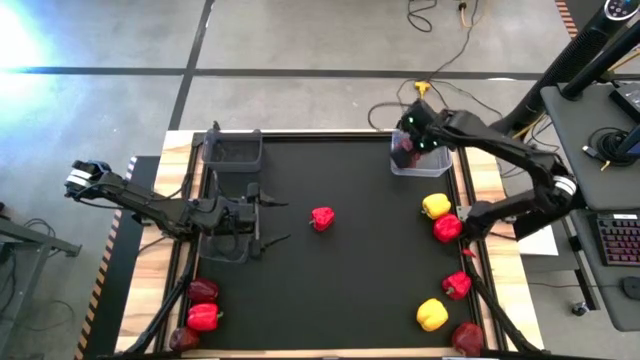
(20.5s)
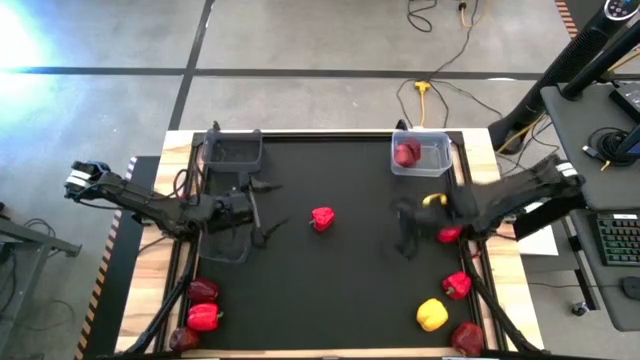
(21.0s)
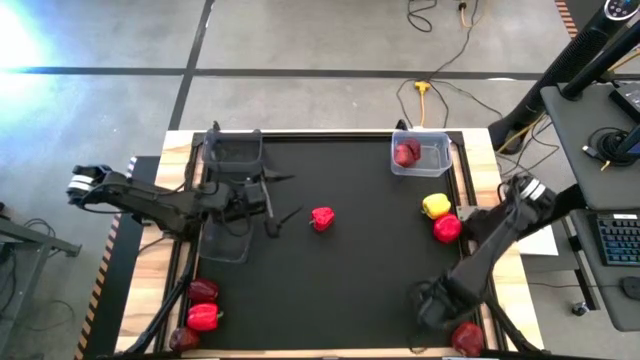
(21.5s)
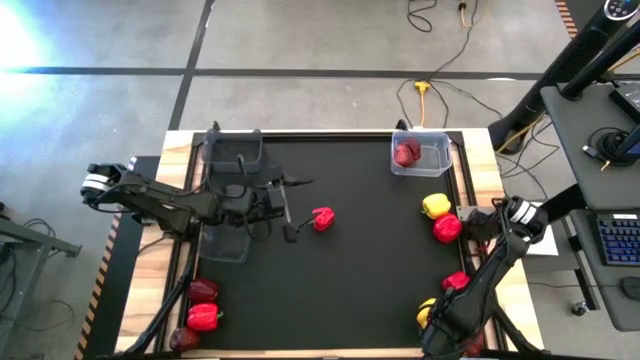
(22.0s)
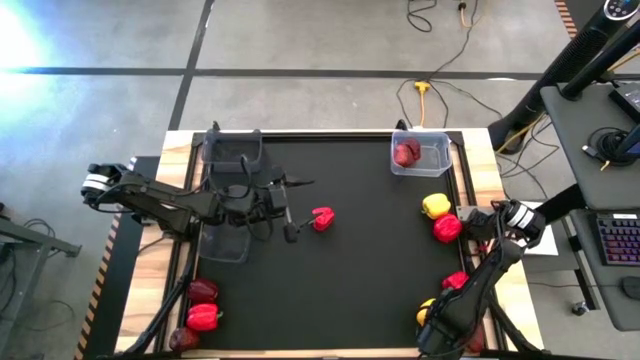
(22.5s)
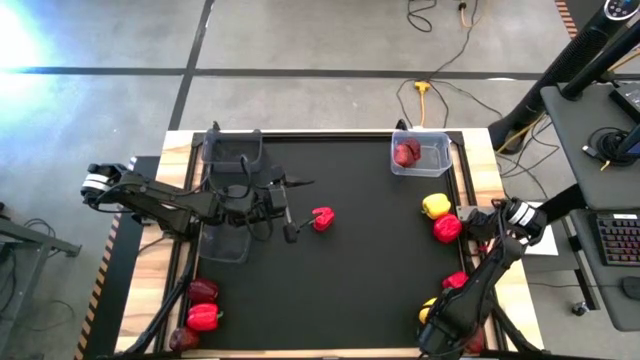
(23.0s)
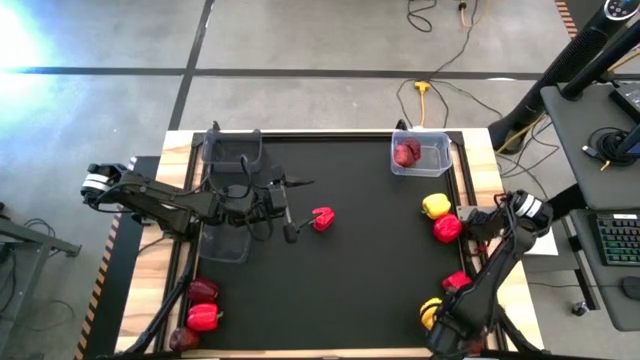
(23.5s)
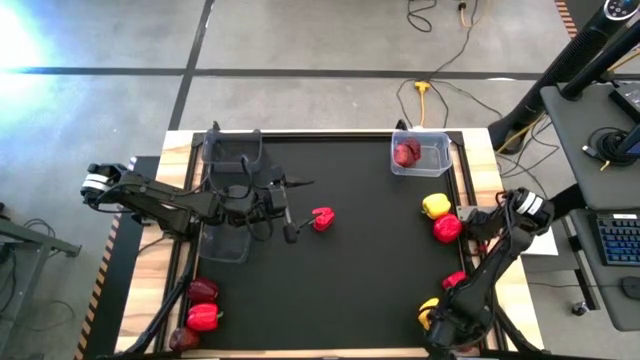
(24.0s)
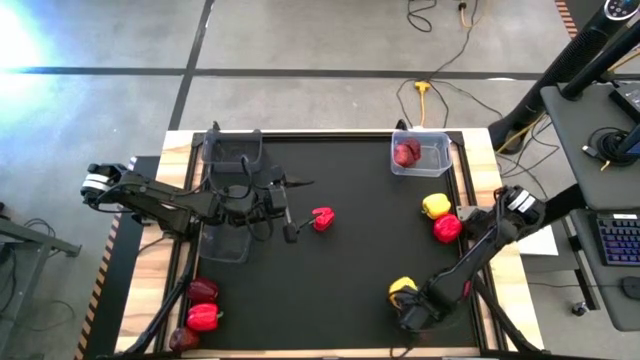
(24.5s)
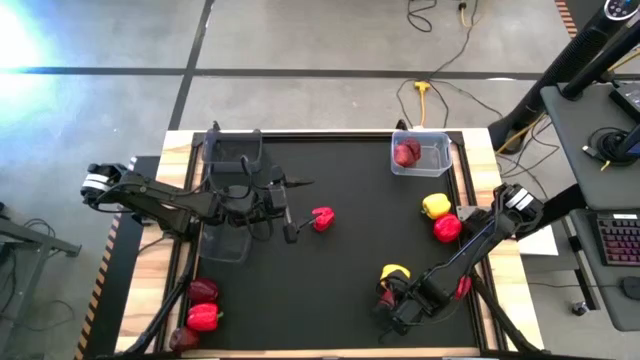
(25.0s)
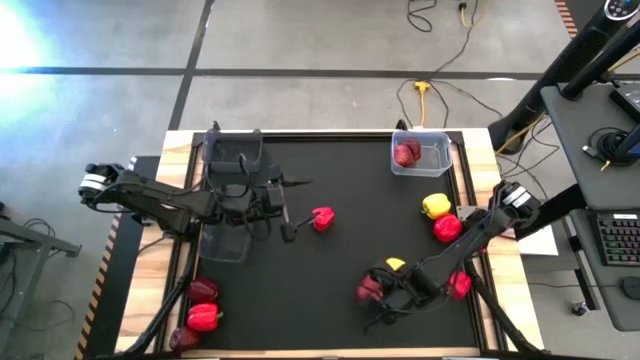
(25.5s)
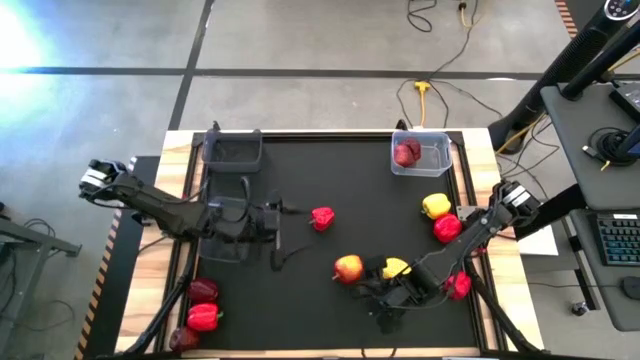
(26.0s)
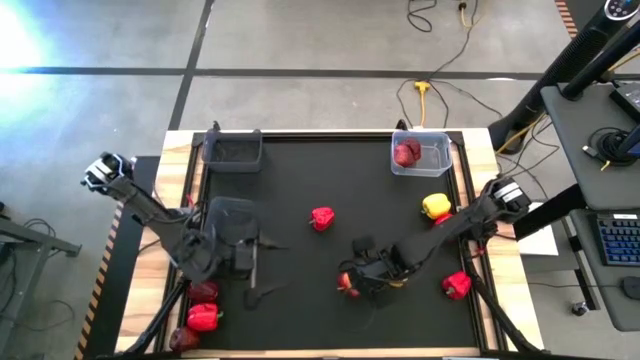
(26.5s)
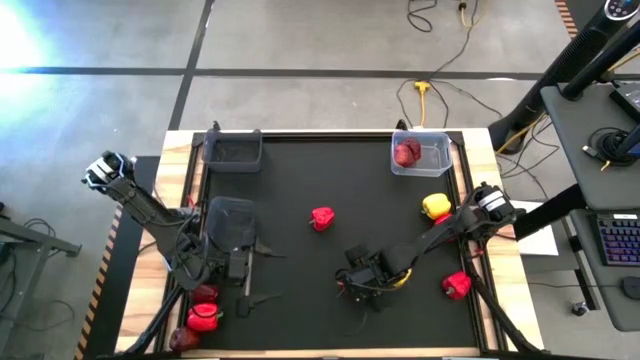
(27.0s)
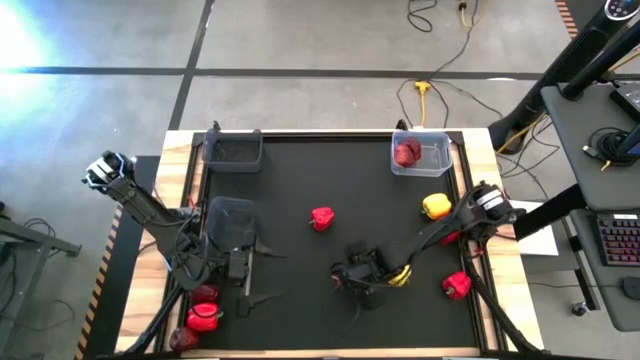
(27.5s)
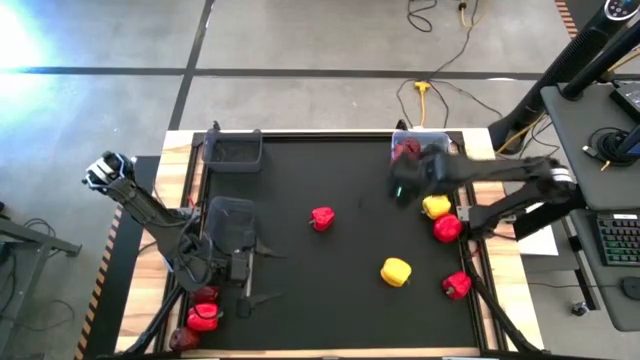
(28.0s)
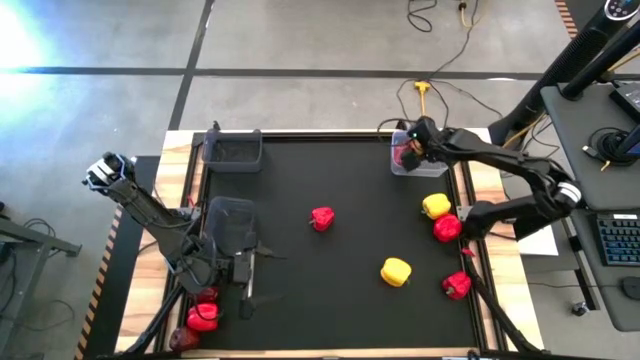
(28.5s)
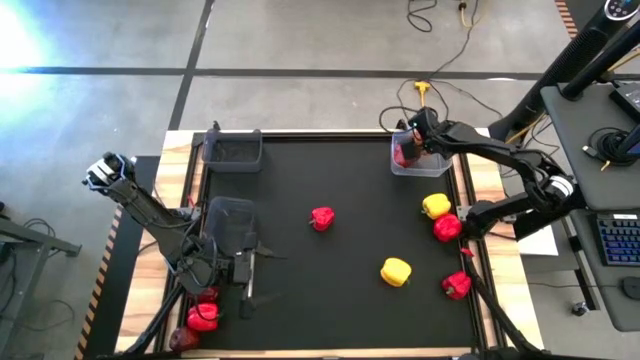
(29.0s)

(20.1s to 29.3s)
Task: Sort produce into baskets
Put the bottom right apple into the transparent bin

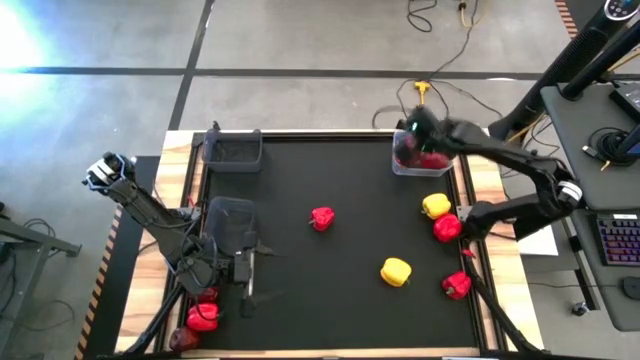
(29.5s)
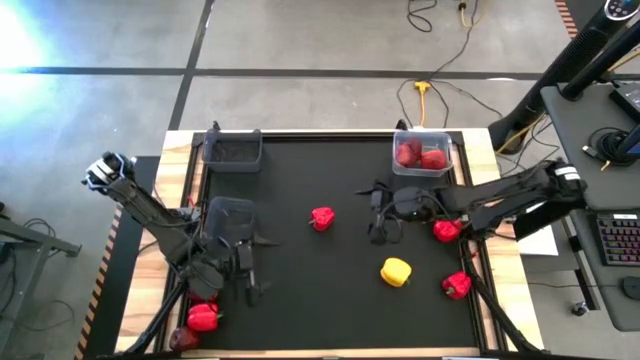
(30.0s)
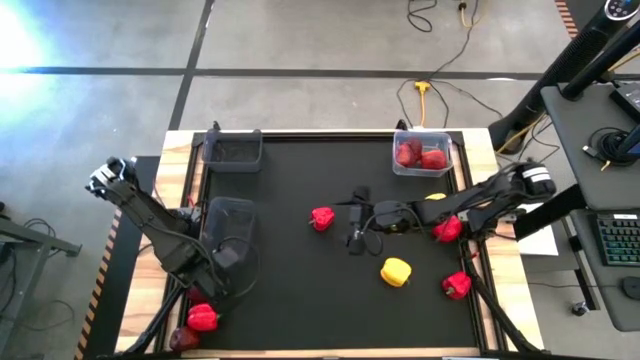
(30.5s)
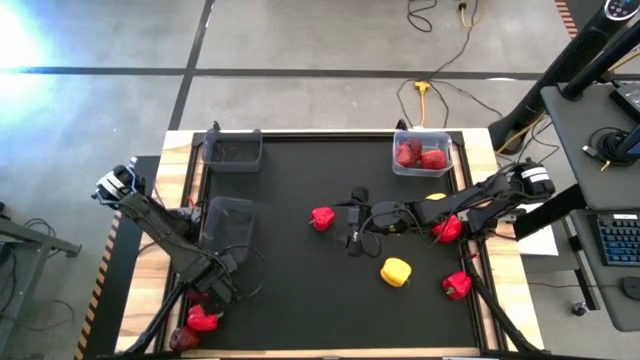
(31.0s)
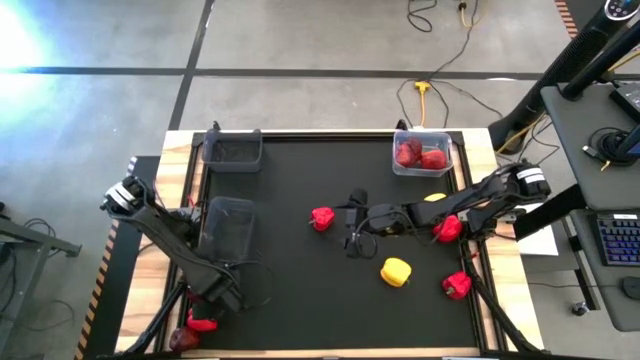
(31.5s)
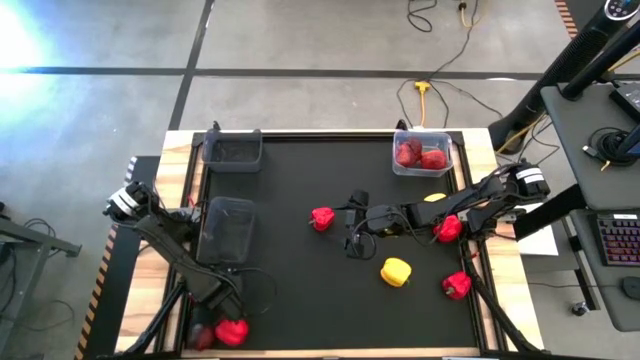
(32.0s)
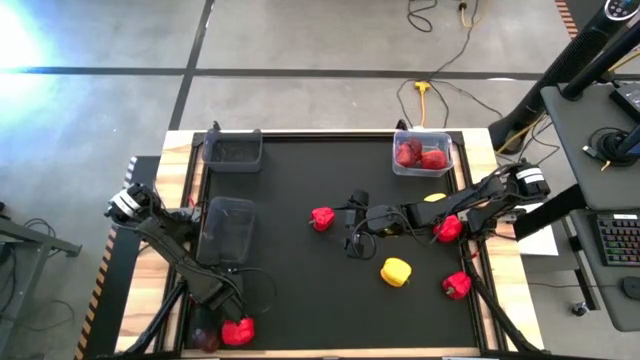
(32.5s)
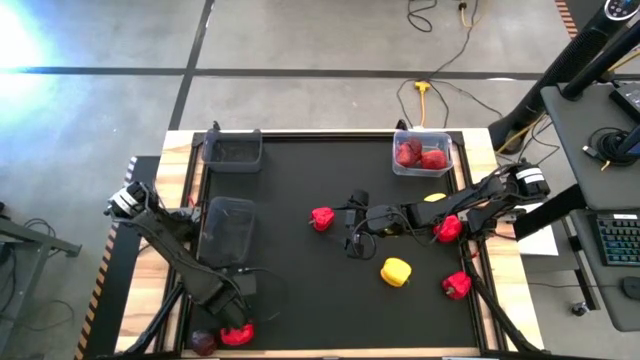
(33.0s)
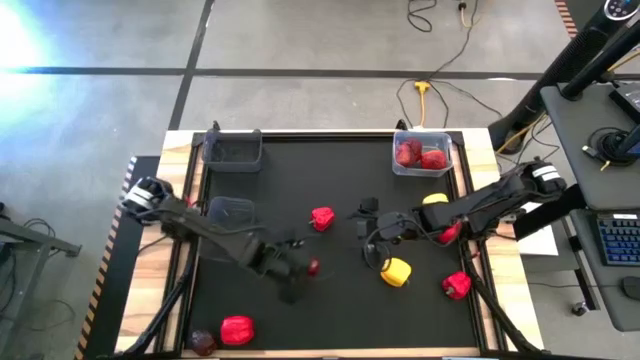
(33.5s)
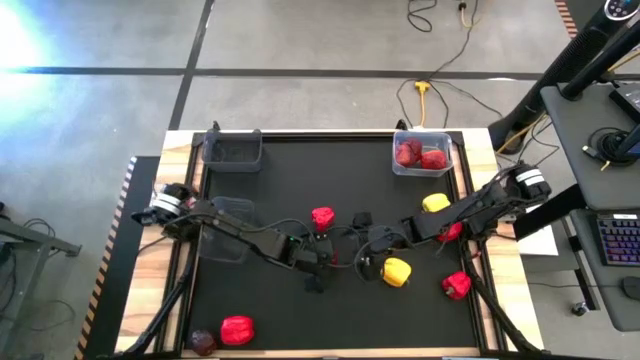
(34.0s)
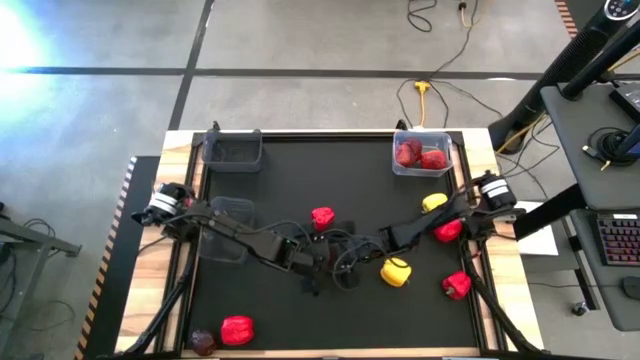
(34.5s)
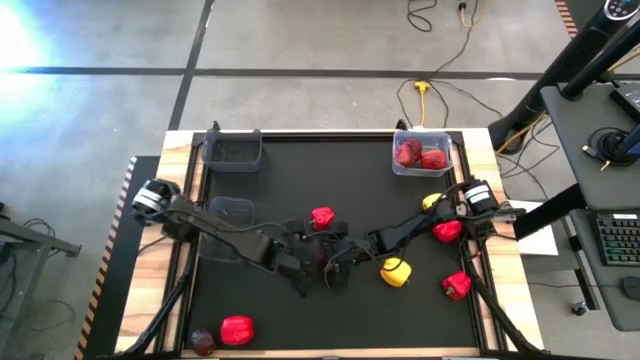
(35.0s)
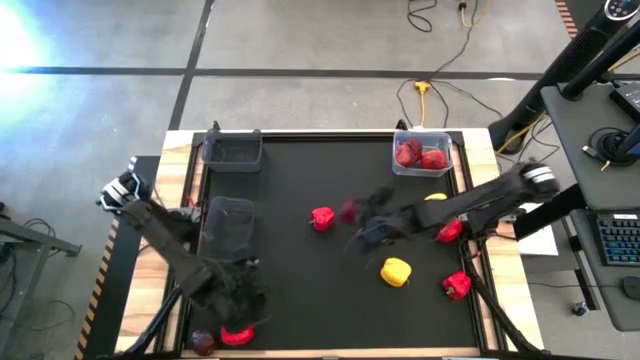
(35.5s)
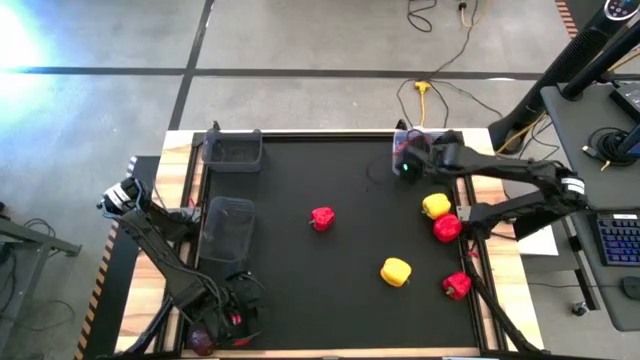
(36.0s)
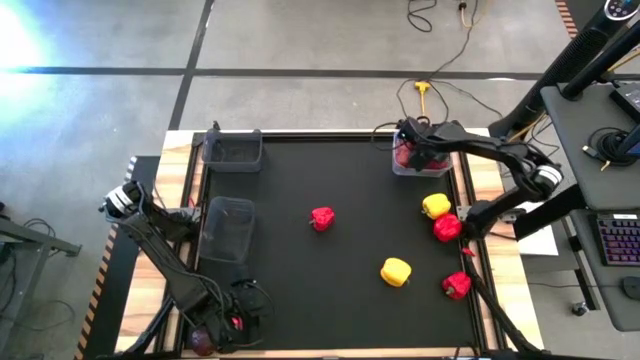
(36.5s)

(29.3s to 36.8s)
Put the top apple into the transparent bin

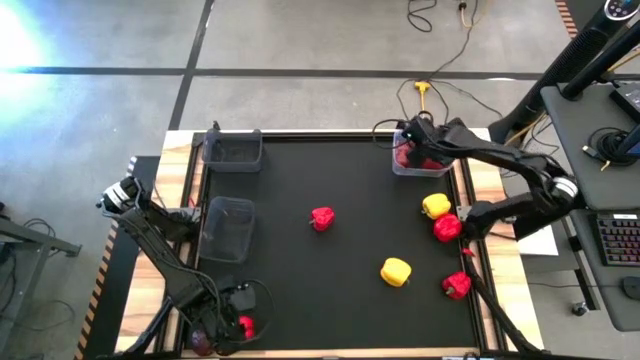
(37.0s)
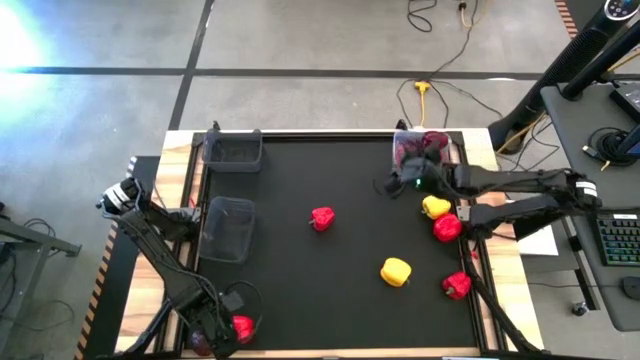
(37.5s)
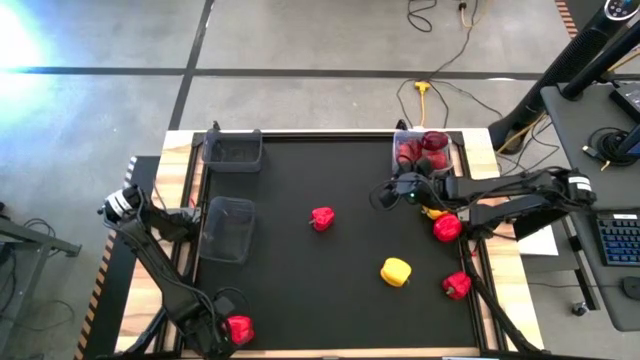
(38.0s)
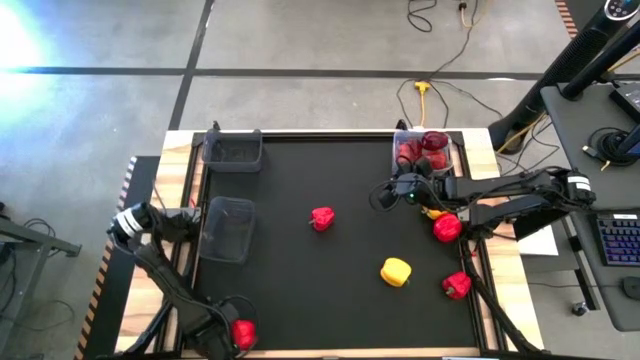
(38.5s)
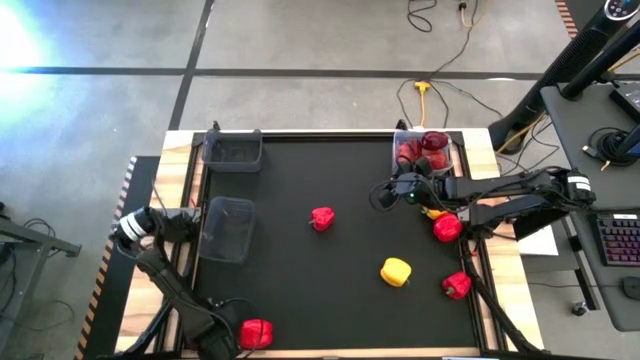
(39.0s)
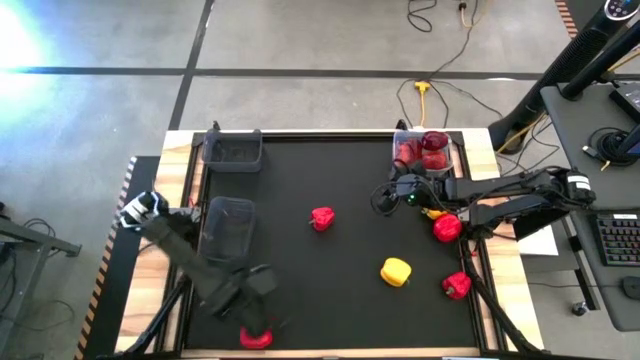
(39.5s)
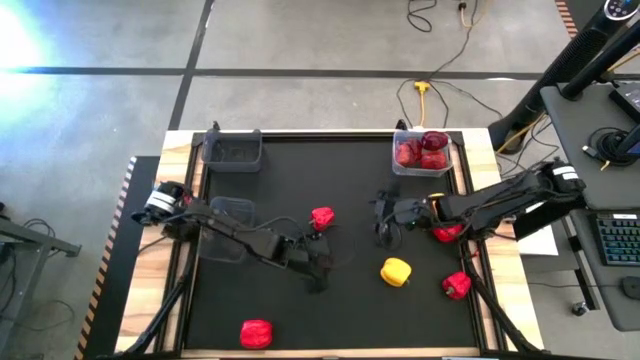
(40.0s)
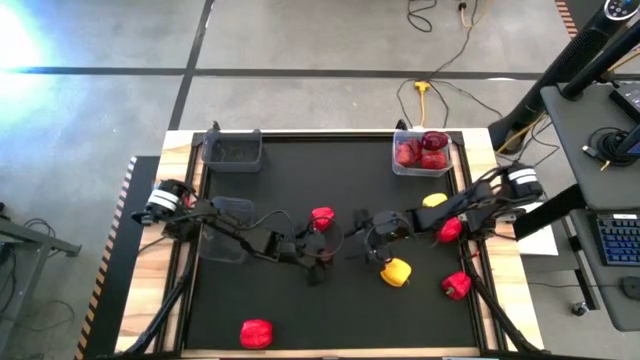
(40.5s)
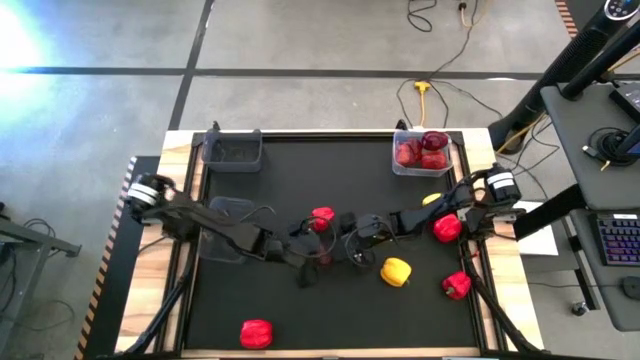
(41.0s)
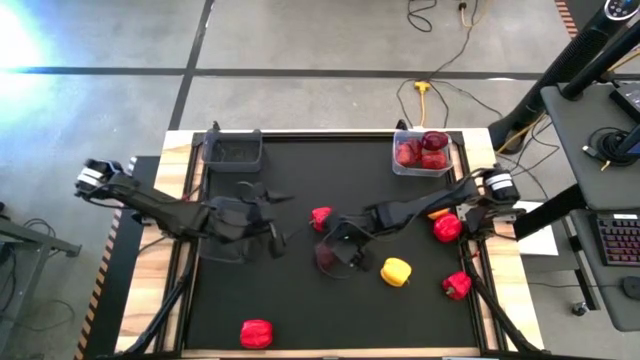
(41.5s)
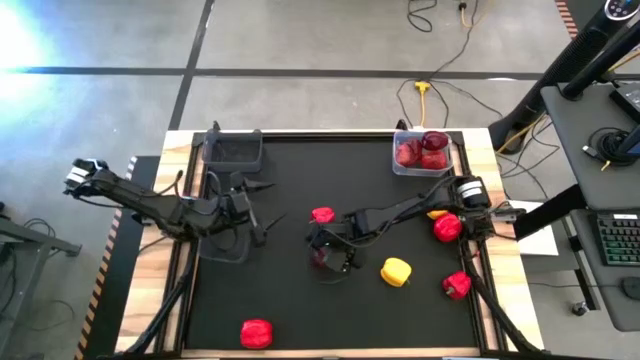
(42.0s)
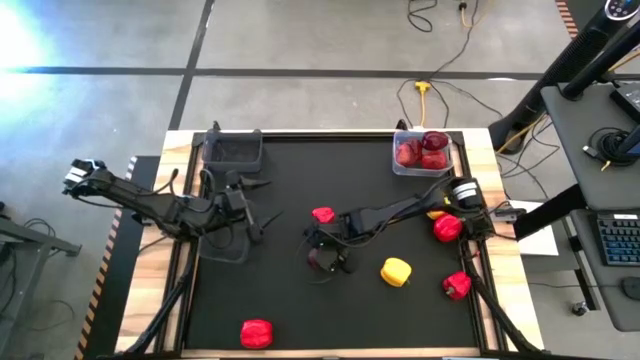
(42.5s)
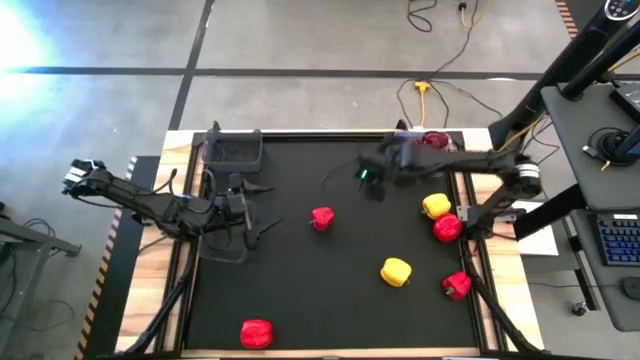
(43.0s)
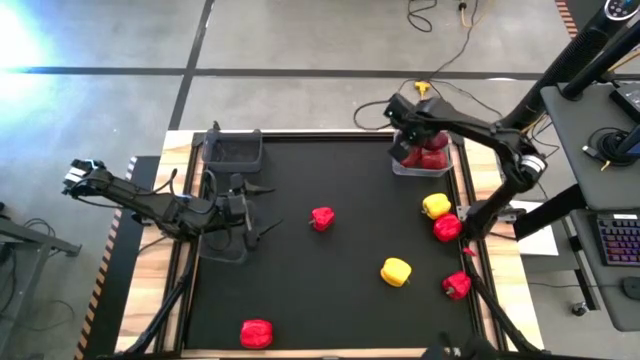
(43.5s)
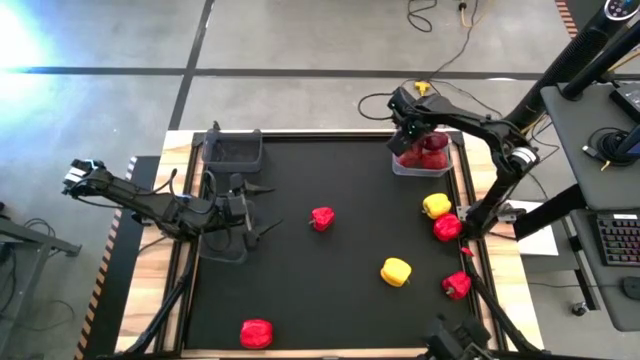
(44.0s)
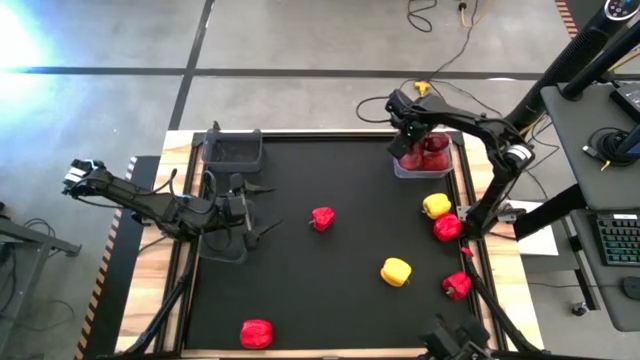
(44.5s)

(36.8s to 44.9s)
Put the apple into the transparent bin
